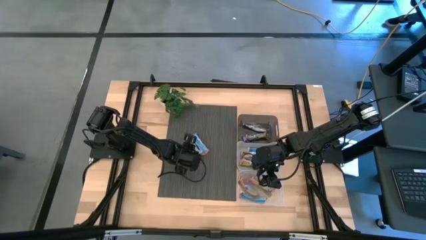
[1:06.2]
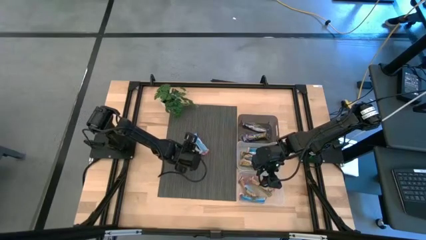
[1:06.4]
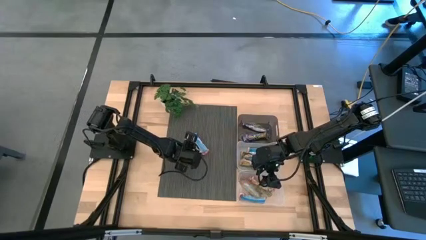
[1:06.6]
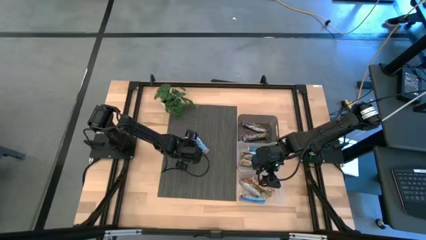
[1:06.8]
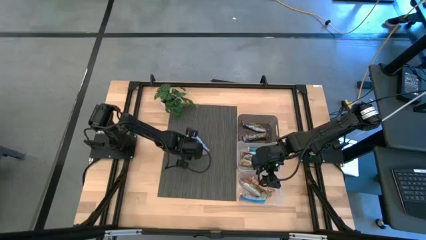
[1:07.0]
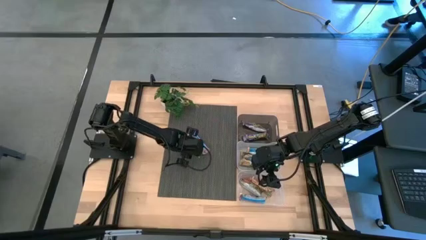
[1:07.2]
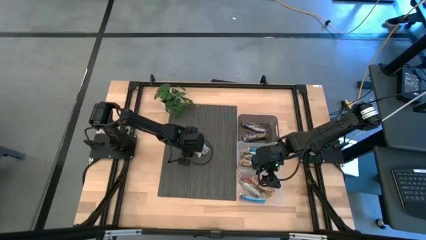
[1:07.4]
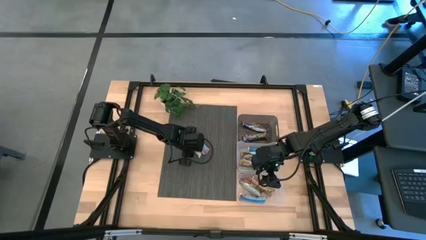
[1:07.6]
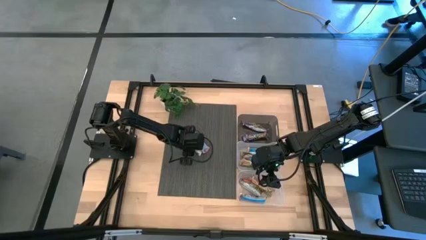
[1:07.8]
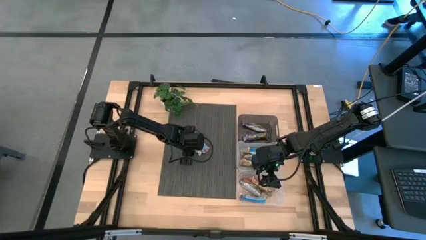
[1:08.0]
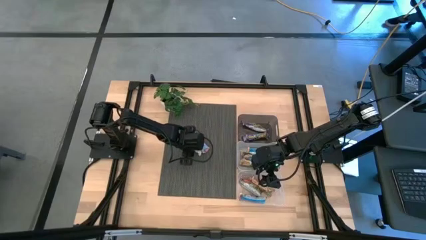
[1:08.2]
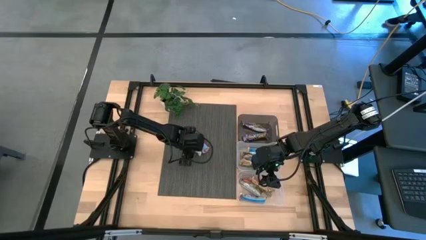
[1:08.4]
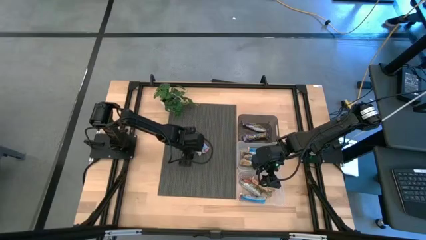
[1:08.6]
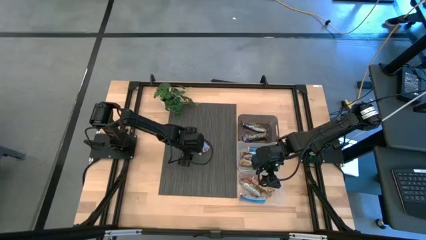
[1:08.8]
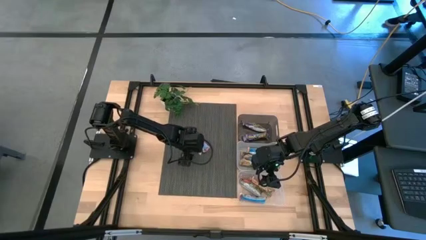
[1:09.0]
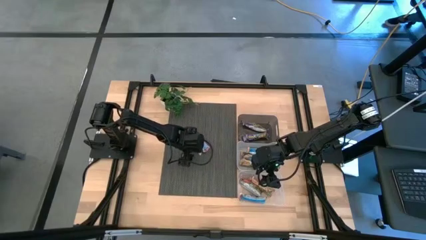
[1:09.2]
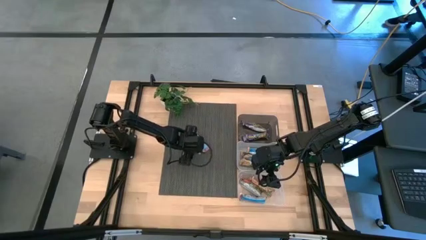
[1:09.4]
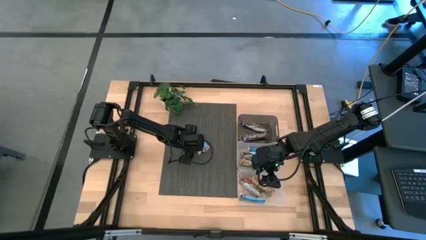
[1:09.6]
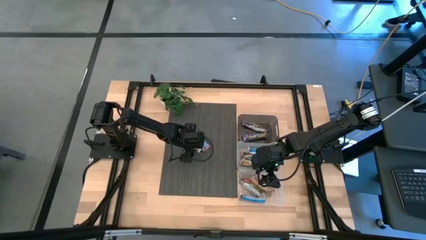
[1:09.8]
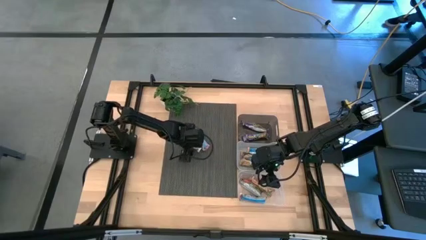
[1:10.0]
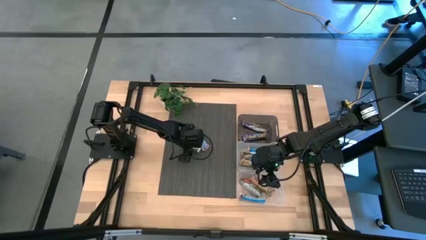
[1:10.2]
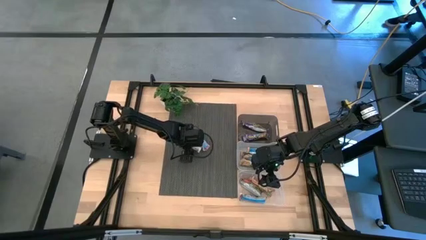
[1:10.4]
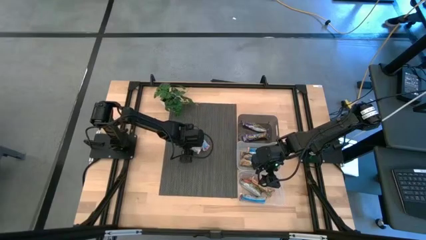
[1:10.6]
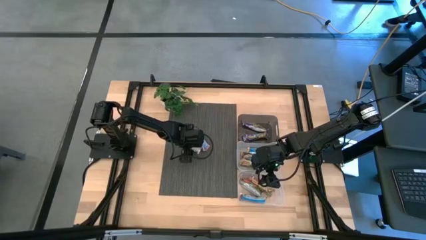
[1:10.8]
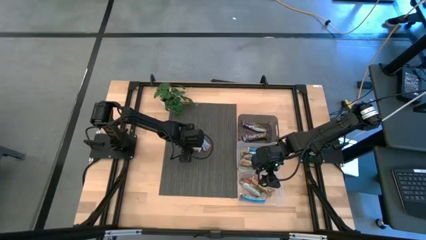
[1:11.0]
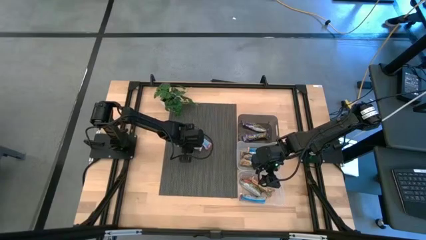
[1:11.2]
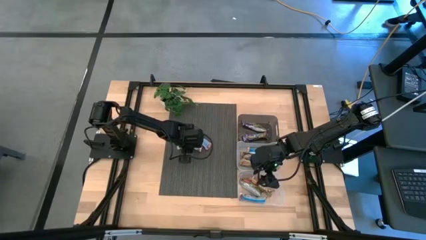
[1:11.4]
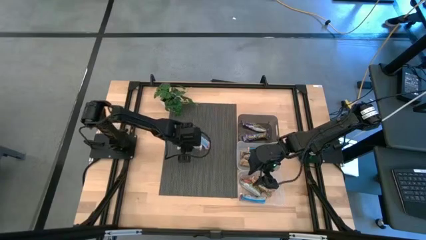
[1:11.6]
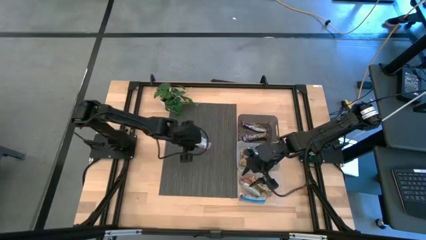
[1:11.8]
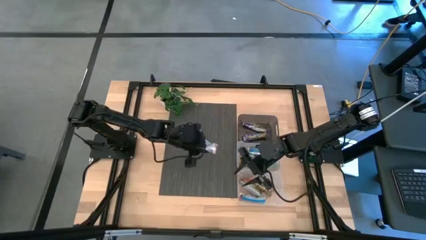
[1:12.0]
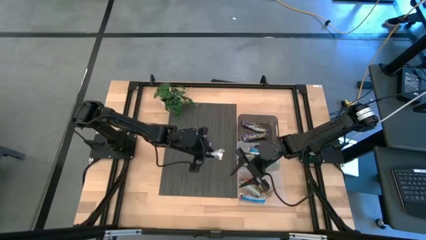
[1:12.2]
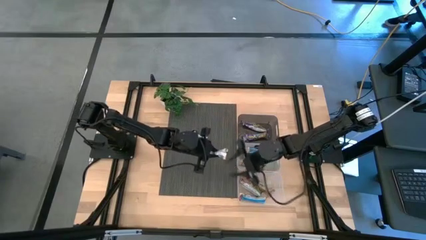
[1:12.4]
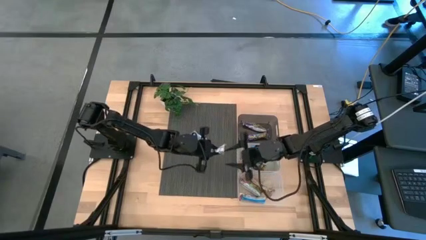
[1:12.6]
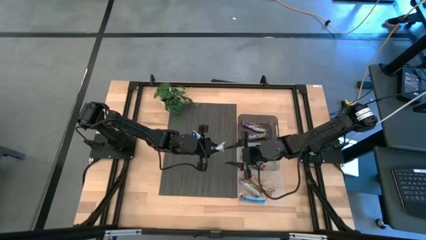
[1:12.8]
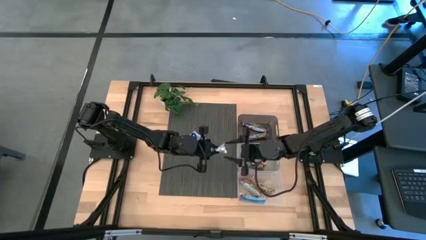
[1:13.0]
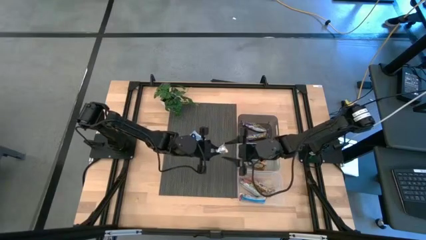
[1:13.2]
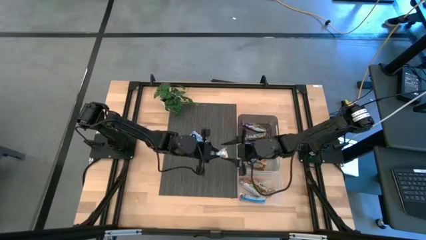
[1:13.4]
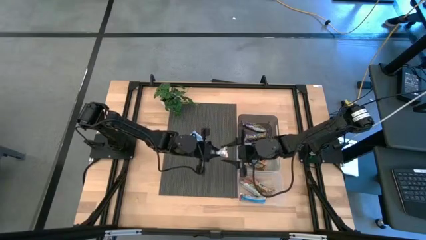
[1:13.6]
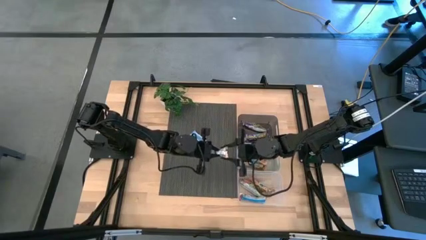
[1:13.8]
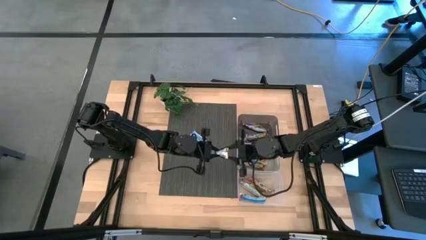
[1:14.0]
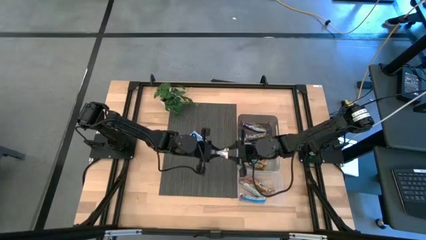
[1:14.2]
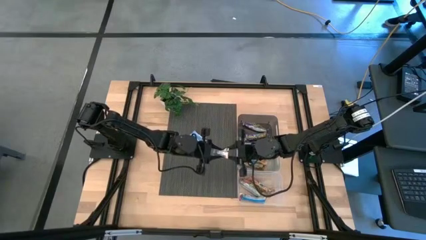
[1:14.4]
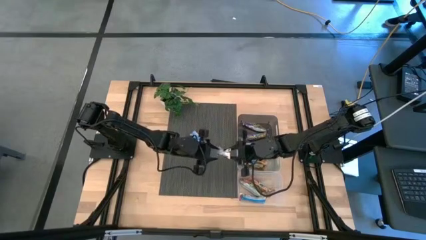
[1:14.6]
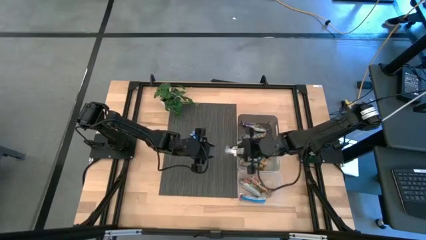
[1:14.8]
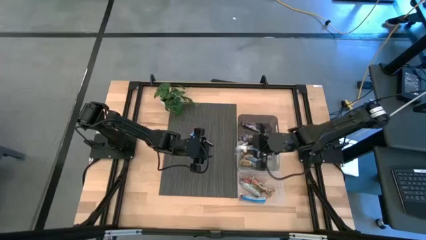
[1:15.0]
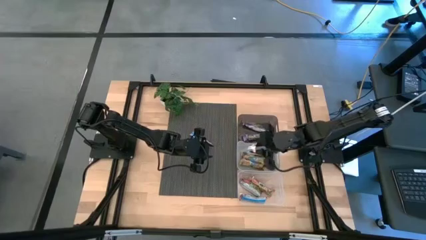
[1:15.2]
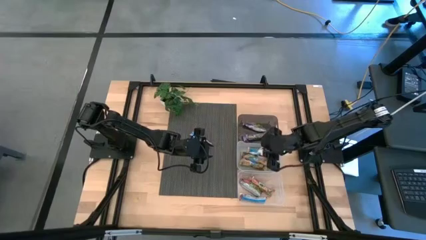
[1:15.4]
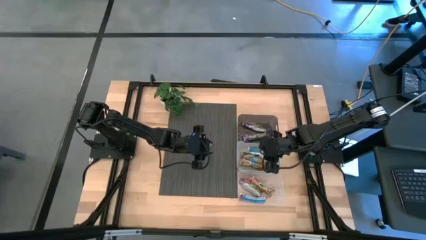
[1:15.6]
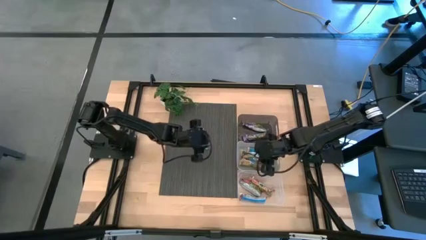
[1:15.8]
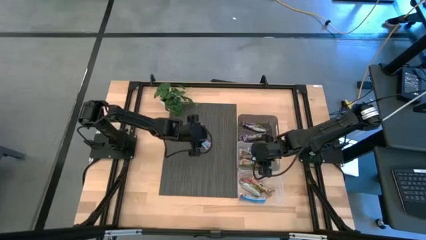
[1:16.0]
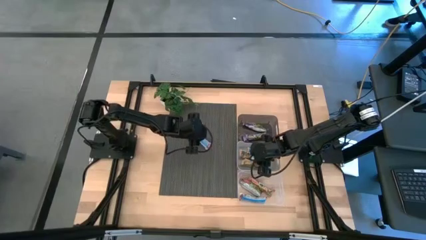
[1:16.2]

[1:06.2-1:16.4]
Task: Pick and place Granola Bars by type
Put the yellow granola bar into the gray bin

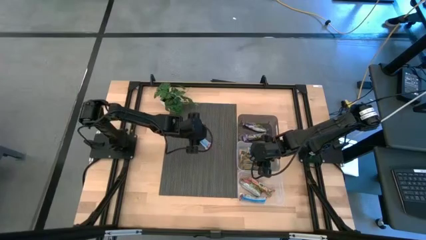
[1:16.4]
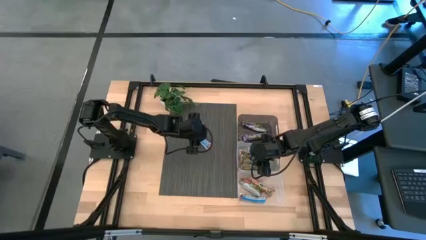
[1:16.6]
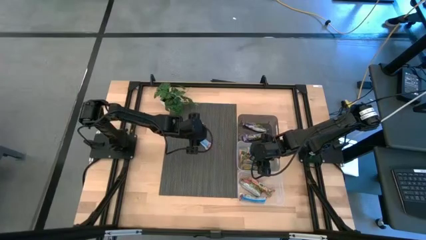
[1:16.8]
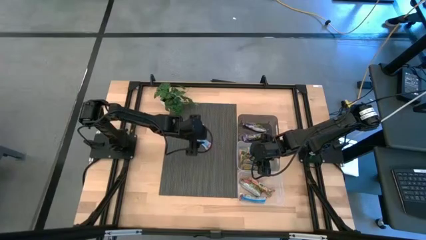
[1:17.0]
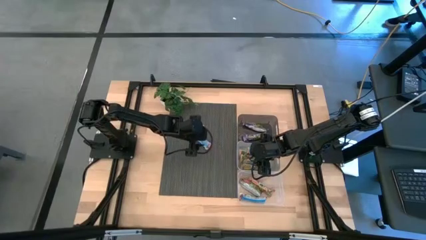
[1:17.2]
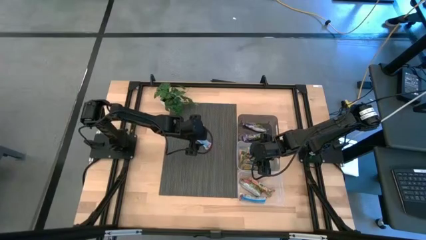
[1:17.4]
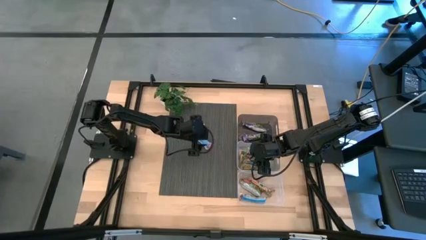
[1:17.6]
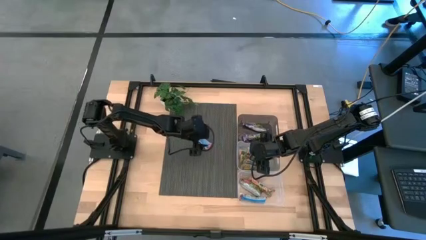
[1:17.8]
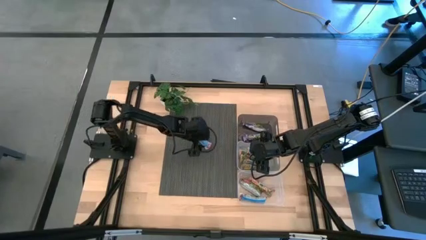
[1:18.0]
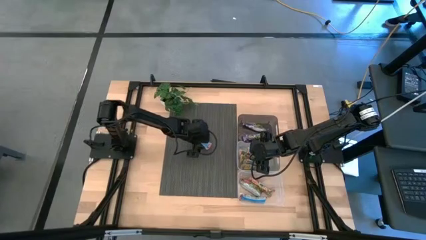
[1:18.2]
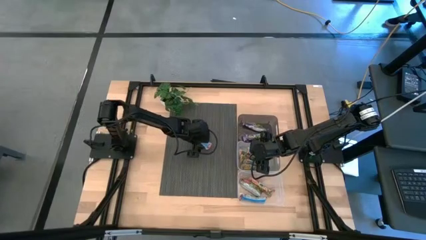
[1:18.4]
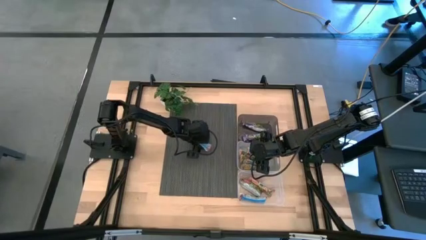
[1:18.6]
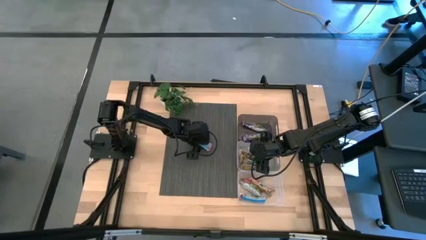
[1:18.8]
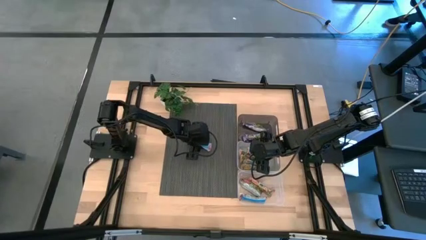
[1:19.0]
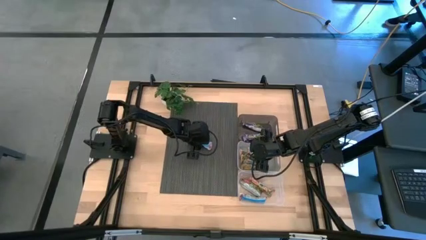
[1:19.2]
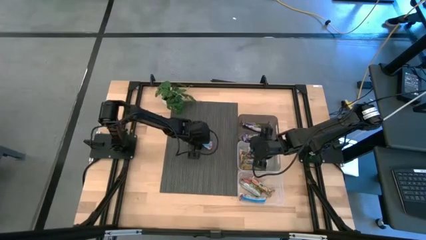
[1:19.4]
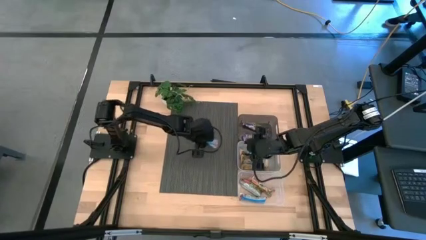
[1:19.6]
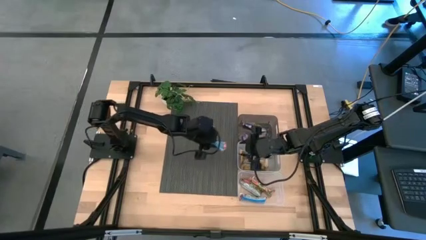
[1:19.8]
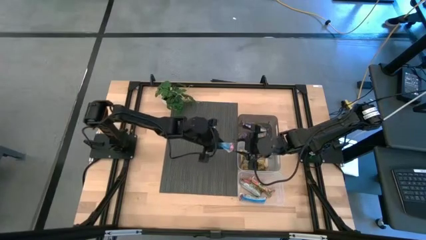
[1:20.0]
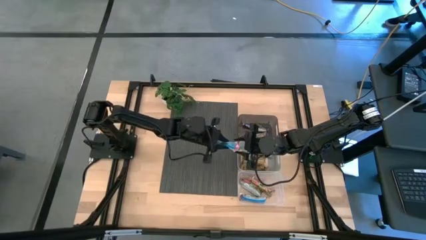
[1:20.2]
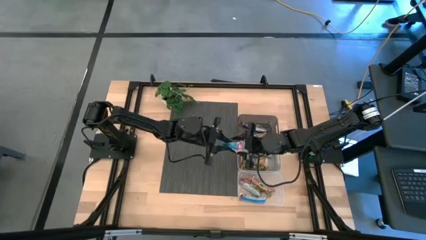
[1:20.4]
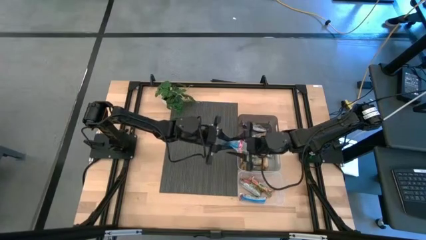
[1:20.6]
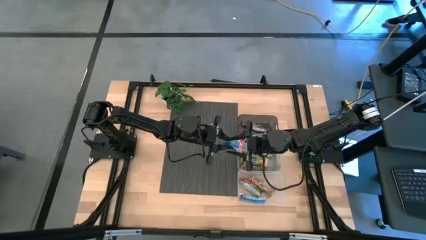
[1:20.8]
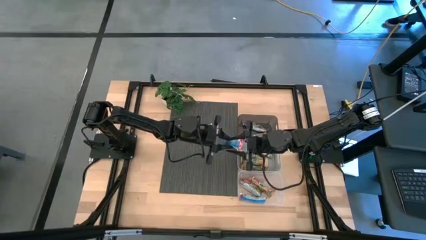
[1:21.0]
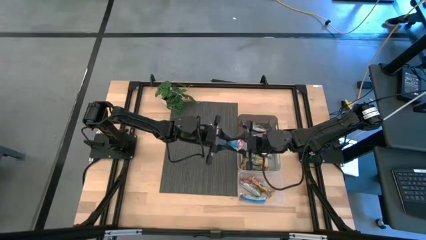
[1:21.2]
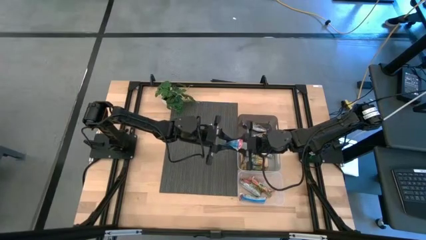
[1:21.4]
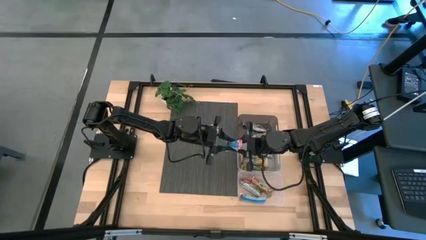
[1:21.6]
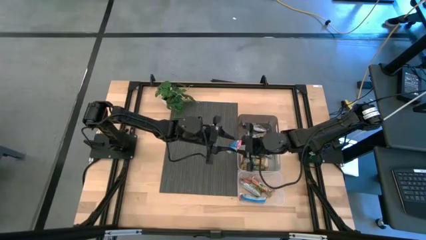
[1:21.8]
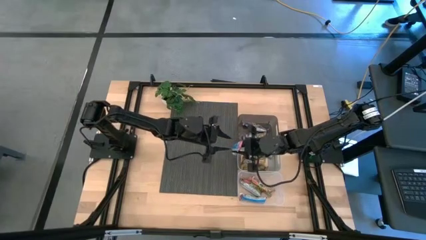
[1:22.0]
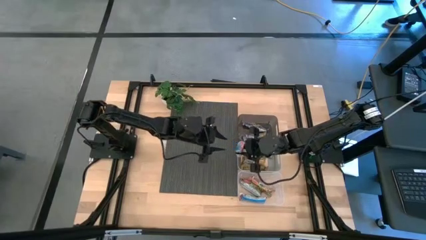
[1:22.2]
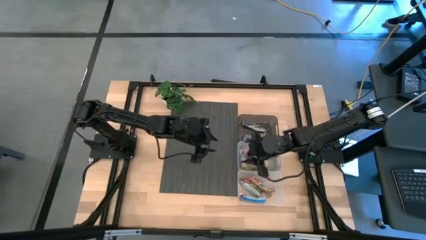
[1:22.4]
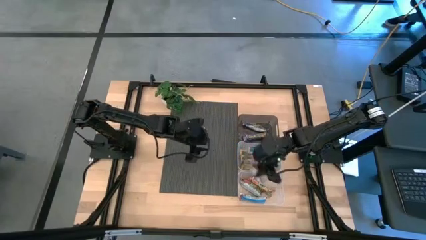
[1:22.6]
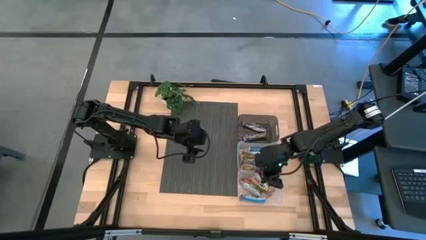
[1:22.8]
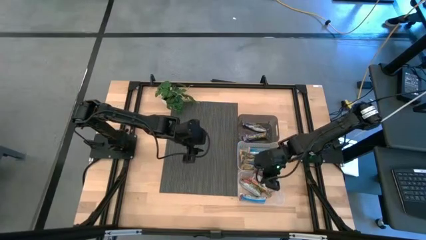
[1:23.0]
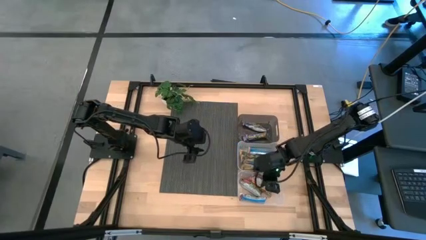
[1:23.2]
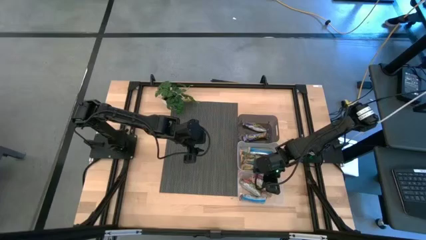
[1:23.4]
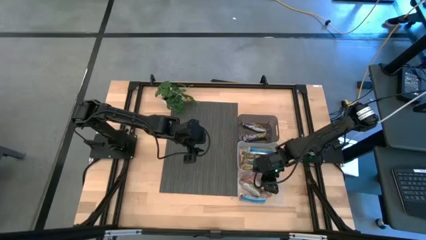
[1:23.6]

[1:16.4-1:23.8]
Put the red granola bar into the transparent bin
